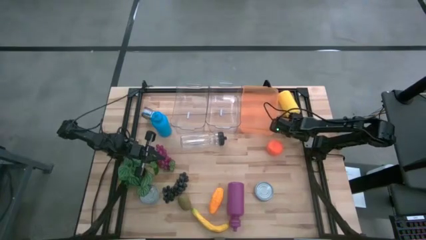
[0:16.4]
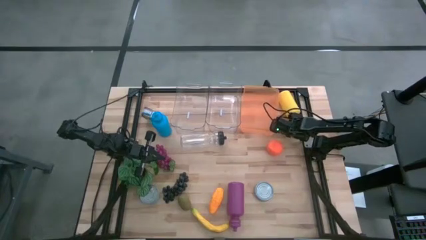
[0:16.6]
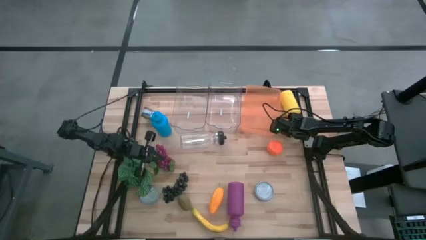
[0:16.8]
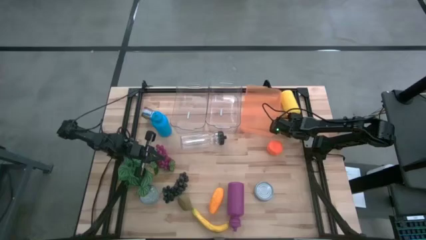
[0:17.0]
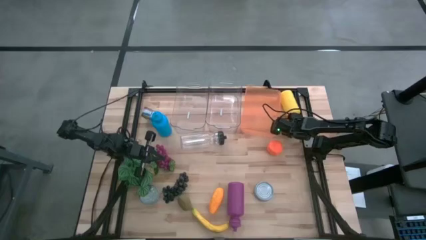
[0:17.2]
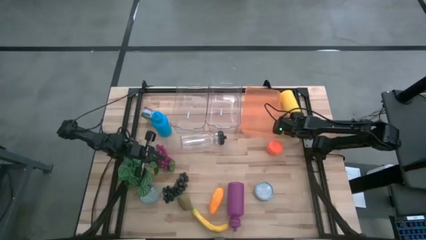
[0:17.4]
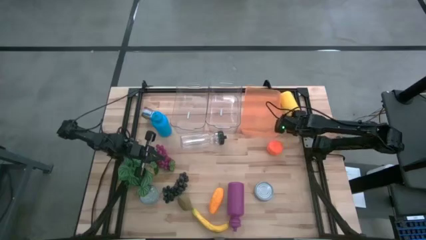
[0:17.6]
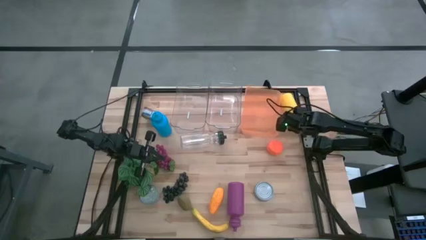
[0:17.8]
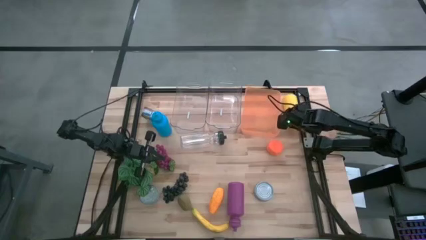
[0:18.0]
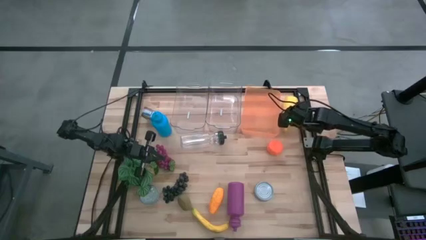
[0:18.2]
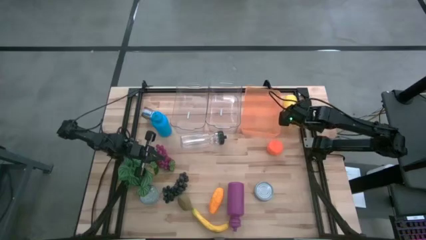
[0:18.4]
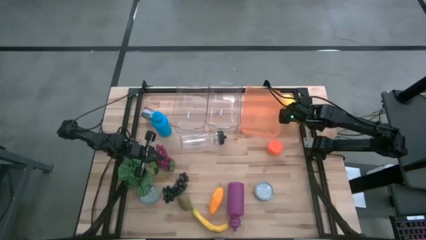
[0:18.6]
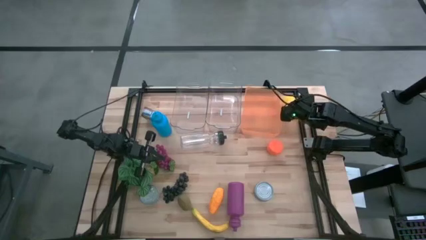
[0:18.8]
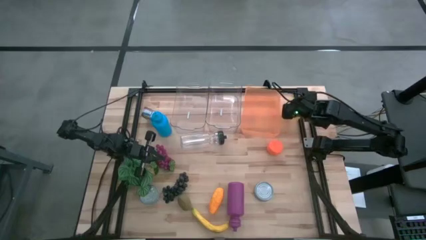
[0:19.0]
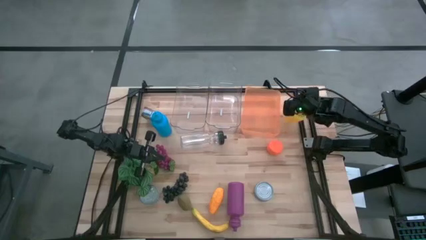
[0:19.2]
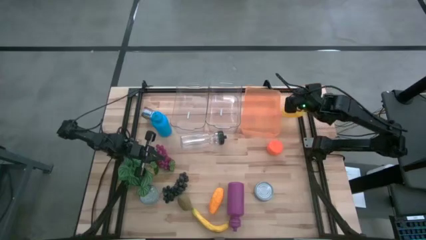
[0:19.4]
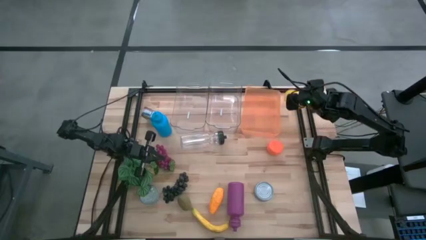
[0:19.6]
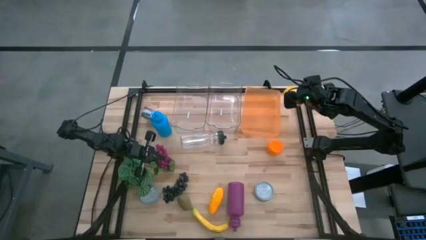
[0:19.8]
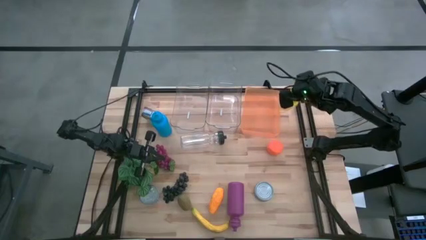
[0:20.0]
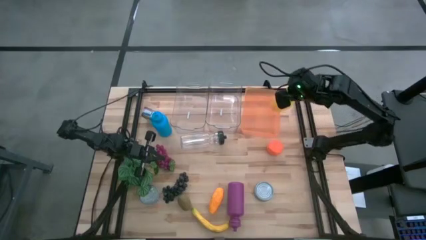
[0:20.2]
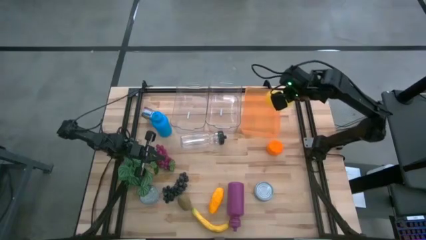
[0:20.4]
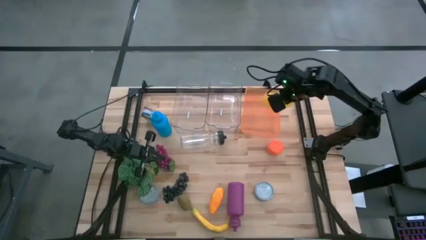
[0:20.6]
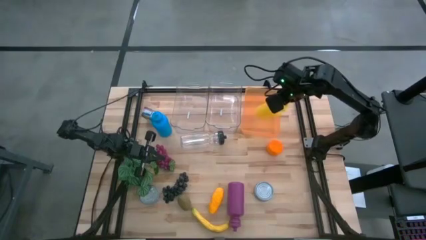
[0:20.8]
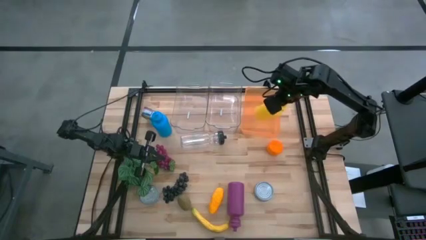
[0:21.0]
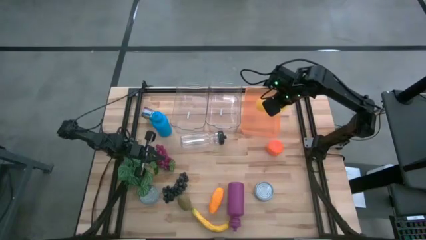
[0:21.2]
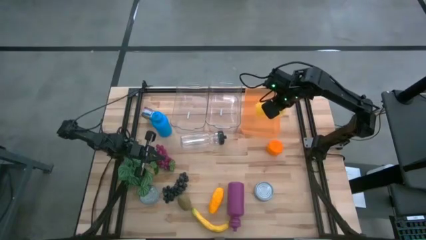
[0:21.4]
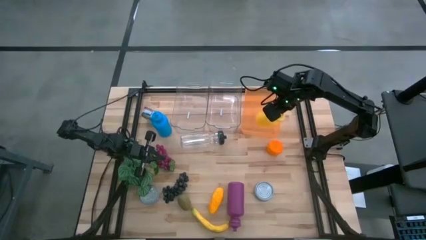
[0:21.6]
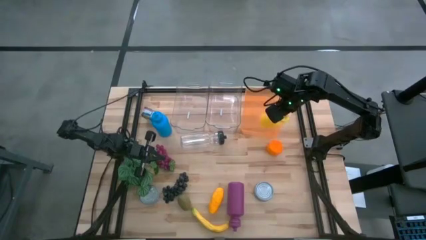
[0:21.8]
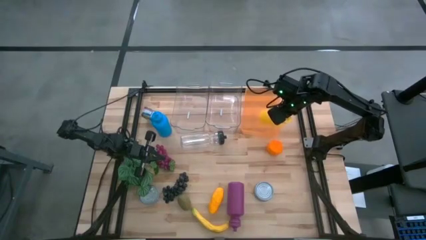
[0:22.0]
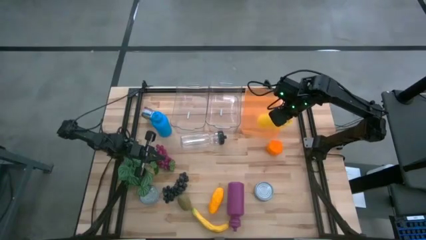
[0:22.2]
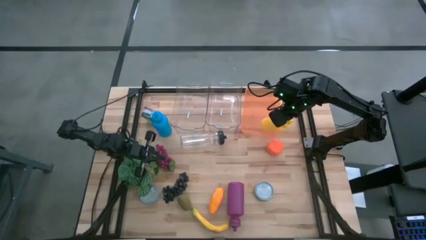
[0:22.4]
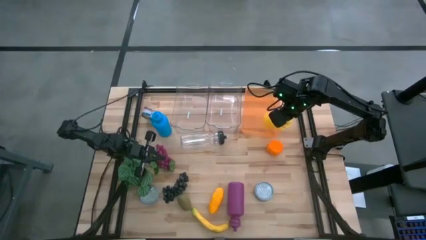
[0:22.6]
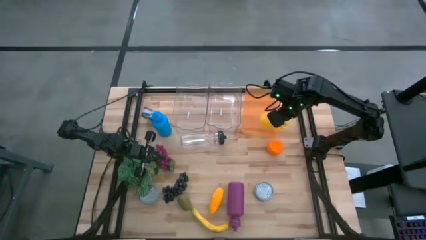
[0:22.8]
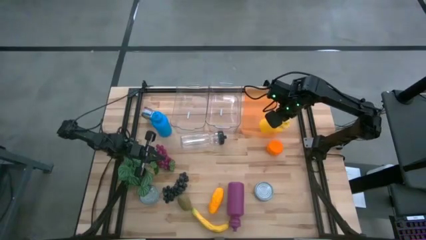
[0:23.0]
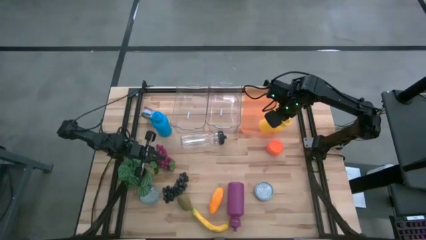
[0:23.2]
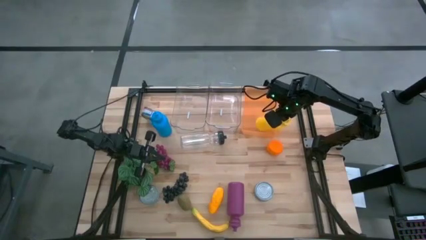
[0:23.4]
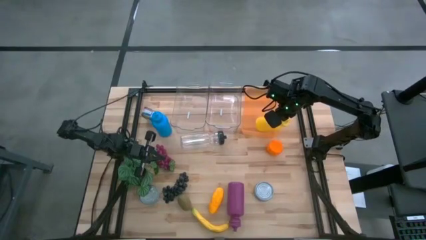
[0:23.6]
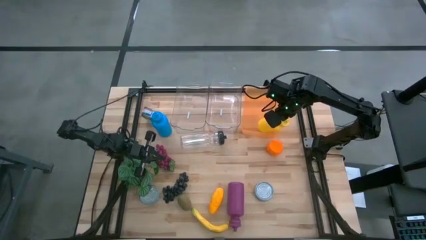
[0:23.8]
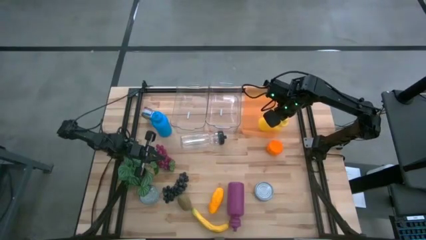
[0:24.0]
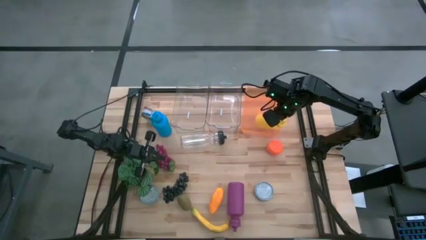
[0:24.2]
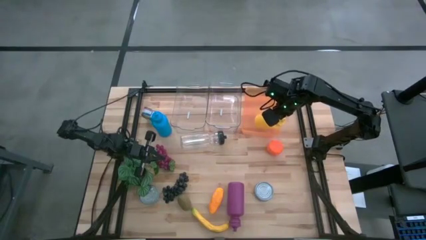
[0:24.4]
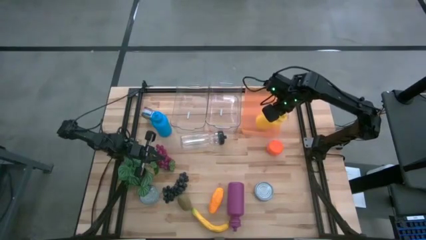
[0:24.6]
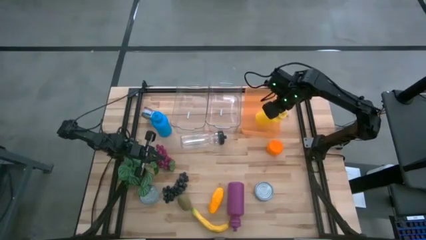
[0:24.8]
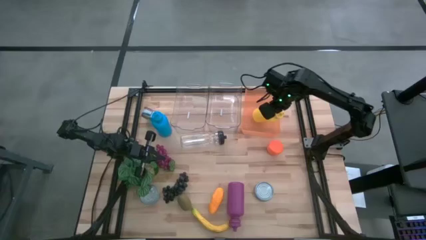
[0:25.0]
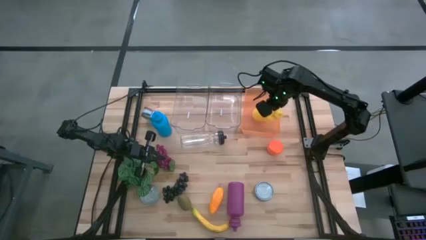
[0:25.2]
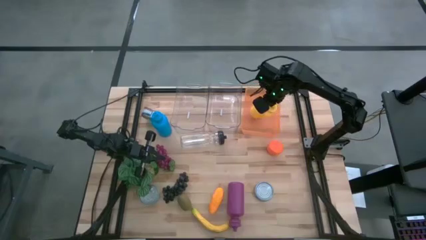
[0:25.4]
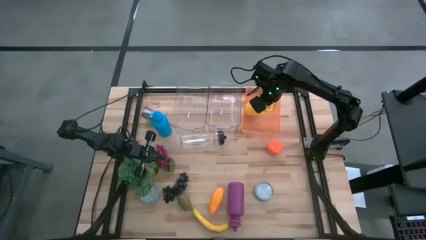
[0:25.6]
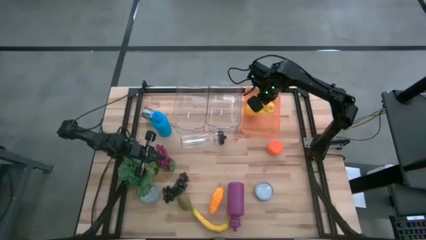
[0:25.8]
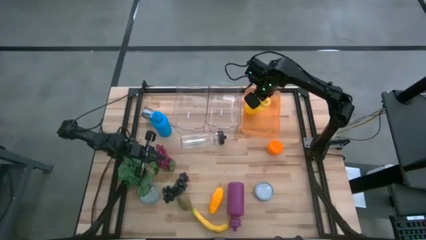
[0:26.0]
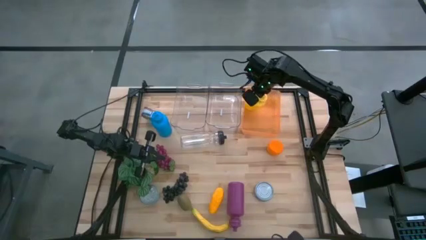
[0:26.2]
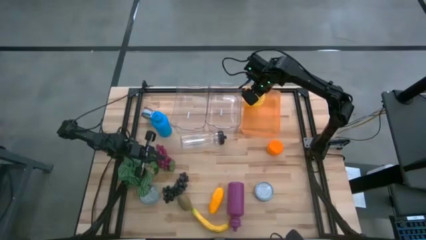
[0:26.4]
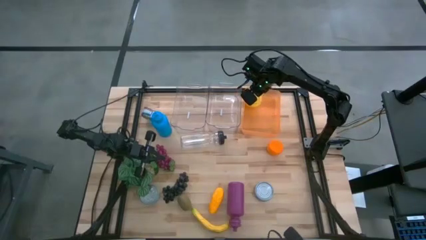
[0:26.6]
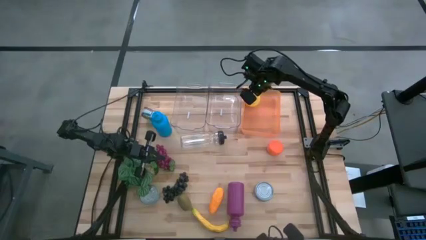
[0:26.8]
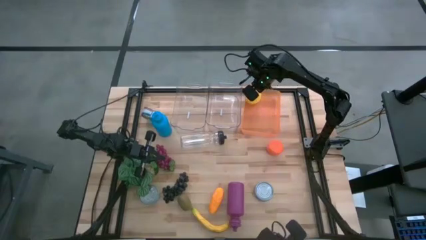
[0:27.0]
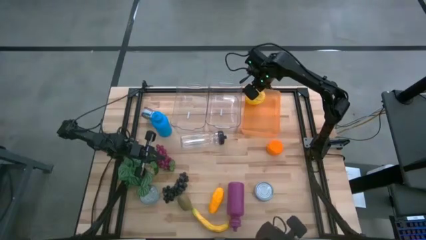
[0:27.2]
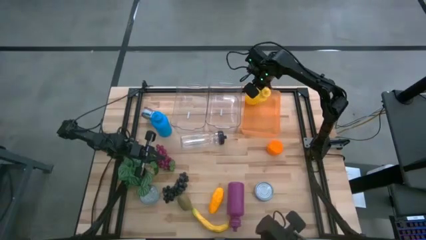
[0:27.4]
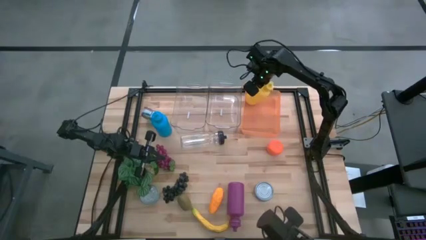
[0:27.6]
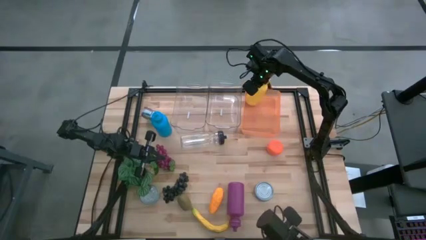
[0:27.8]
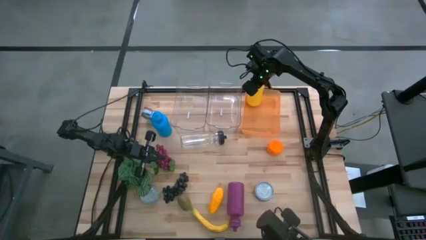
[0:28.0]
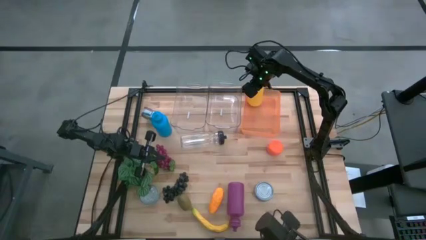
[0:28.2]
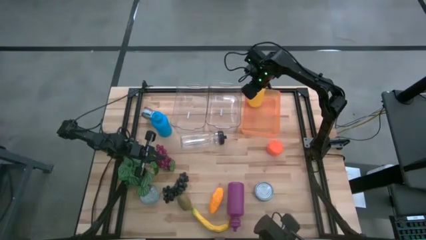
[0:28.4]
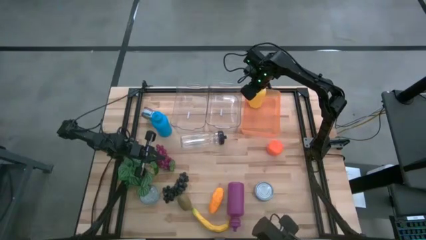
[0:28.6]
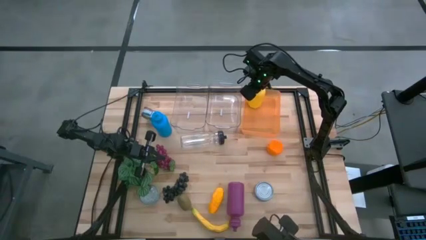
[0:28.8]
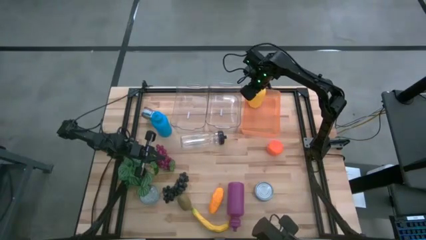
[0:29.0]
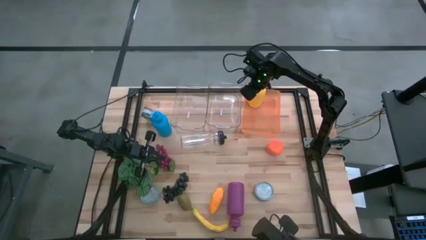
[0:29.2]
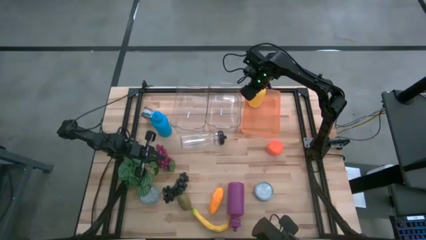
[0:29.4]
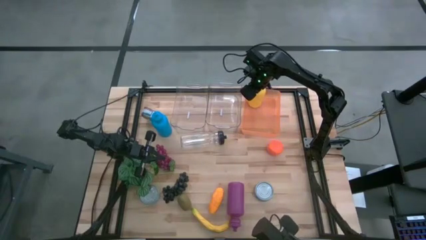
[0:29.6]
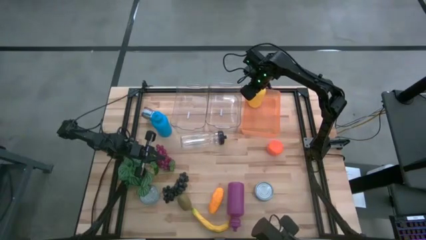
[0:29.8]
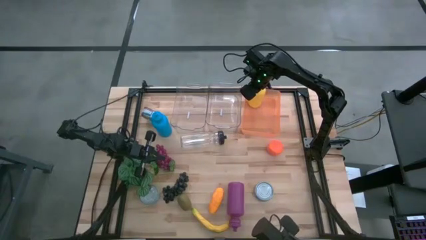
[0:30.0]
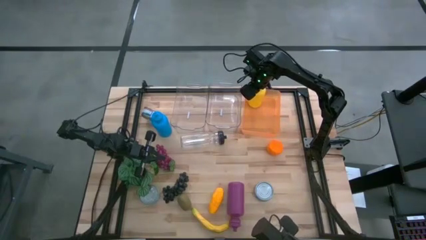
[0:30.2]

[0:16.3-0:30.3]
Task: Pick & Place Food Item
Put the yellow water bottle into the orange bin
